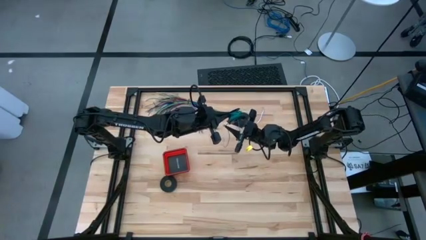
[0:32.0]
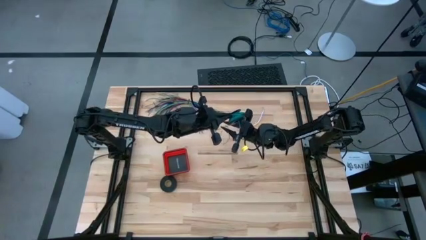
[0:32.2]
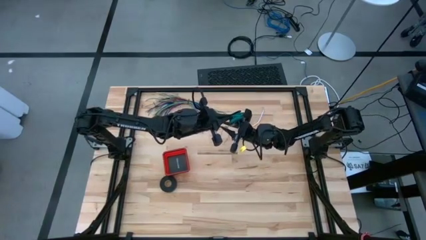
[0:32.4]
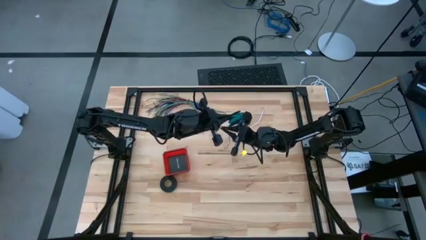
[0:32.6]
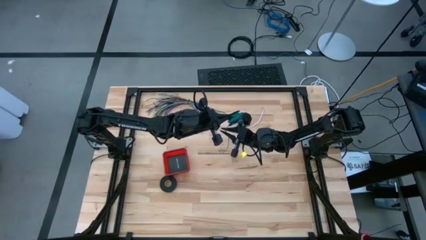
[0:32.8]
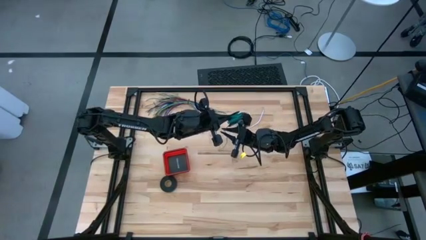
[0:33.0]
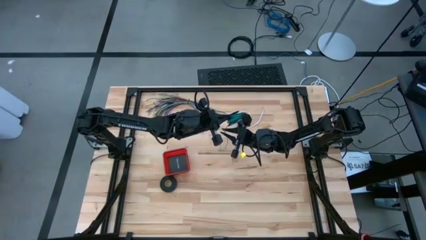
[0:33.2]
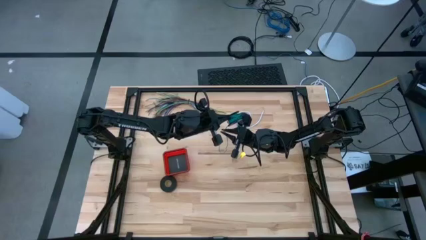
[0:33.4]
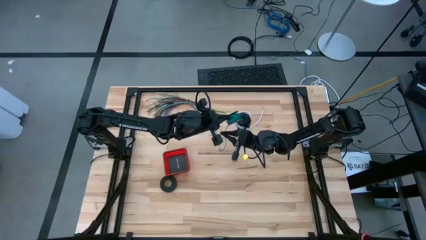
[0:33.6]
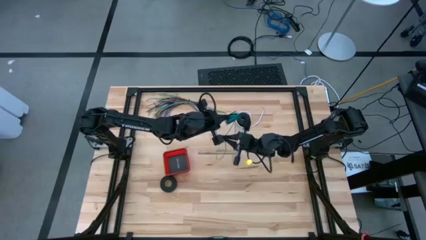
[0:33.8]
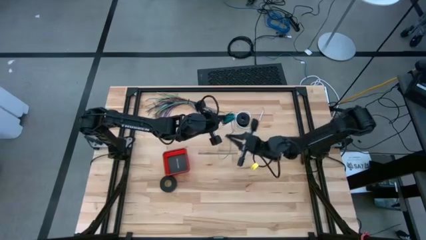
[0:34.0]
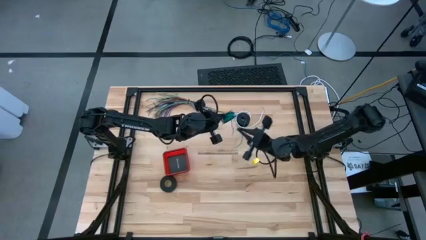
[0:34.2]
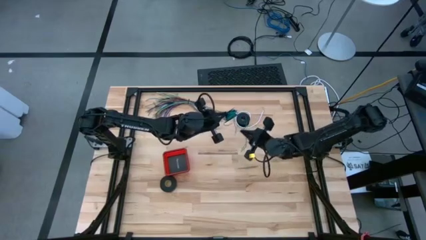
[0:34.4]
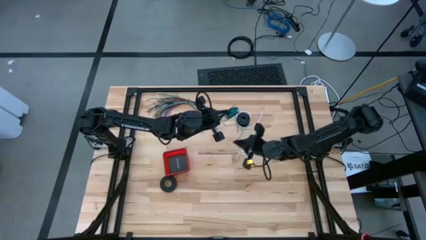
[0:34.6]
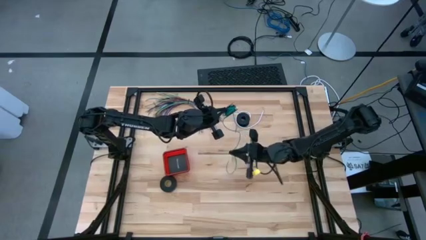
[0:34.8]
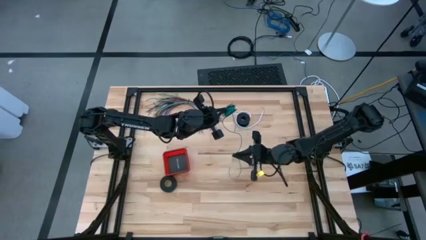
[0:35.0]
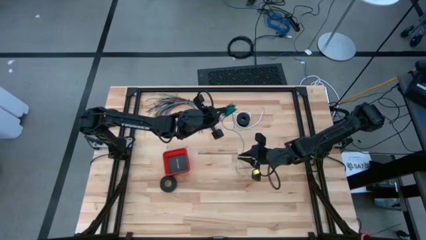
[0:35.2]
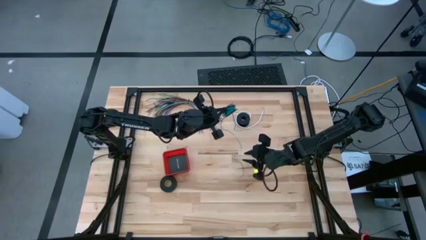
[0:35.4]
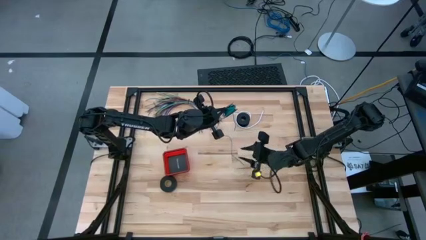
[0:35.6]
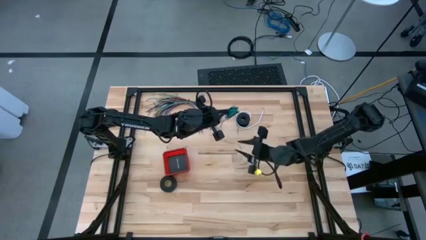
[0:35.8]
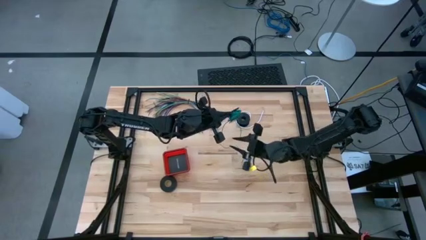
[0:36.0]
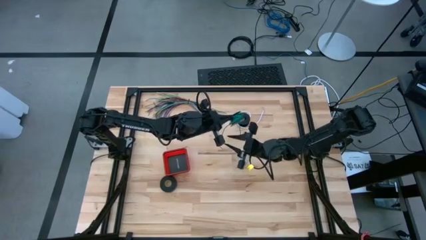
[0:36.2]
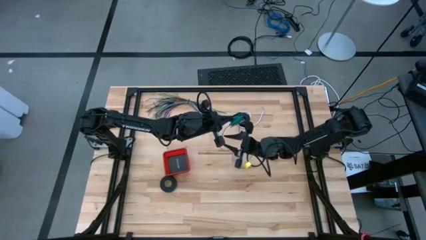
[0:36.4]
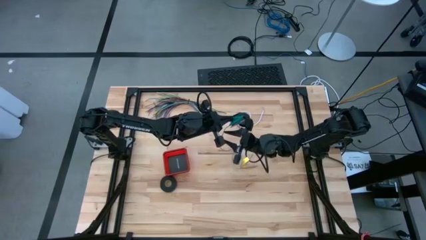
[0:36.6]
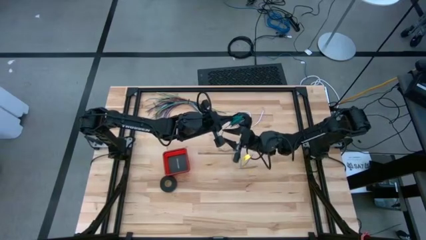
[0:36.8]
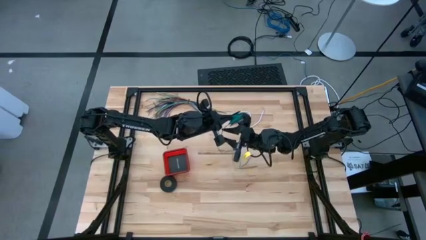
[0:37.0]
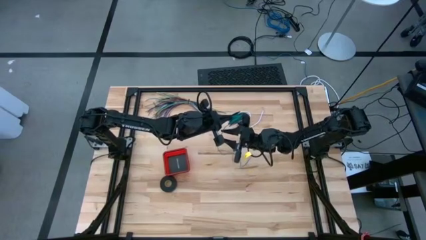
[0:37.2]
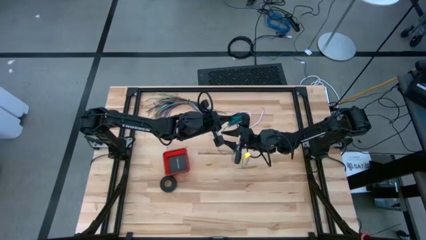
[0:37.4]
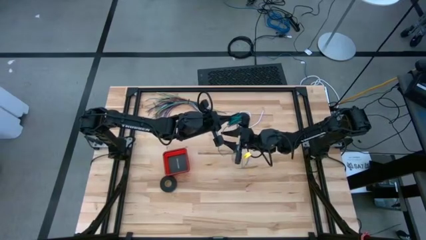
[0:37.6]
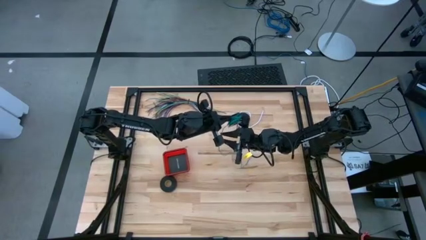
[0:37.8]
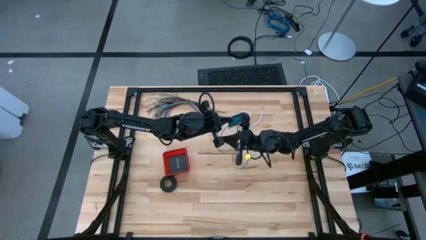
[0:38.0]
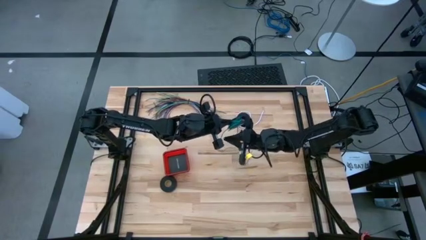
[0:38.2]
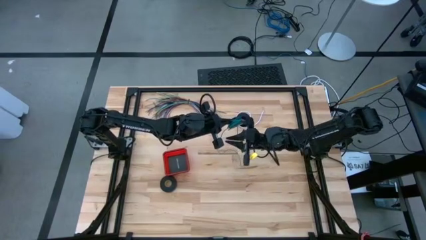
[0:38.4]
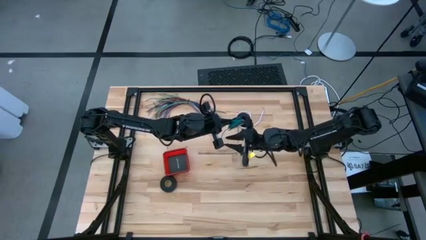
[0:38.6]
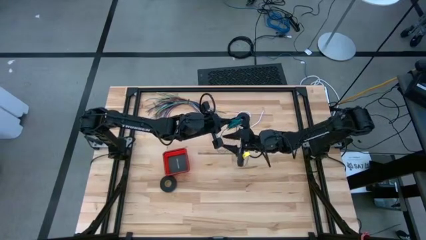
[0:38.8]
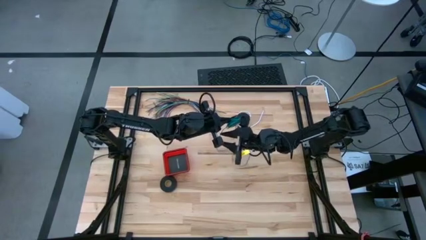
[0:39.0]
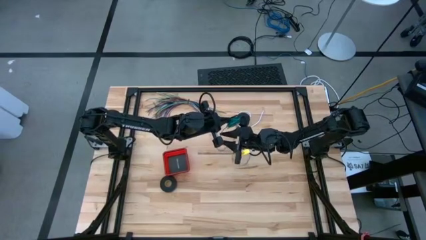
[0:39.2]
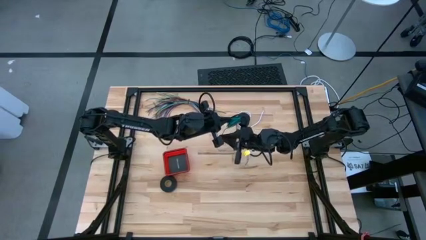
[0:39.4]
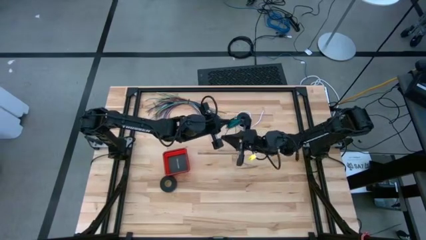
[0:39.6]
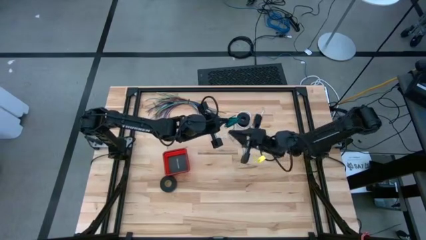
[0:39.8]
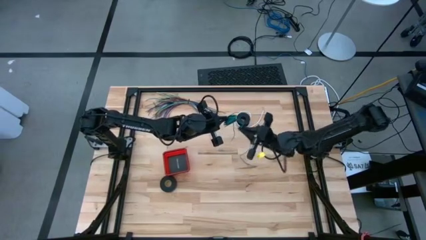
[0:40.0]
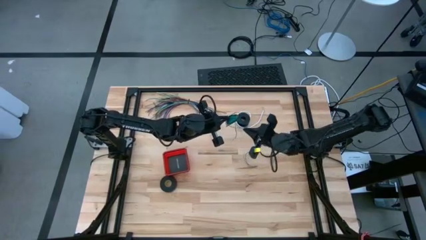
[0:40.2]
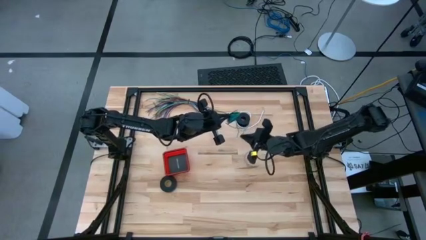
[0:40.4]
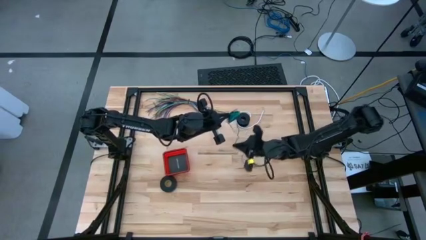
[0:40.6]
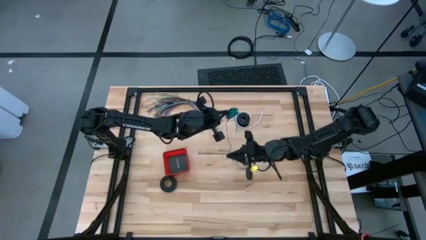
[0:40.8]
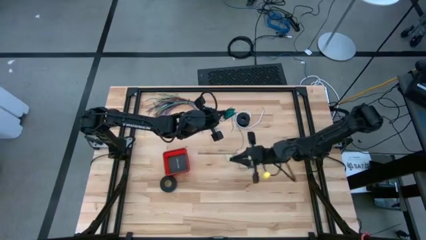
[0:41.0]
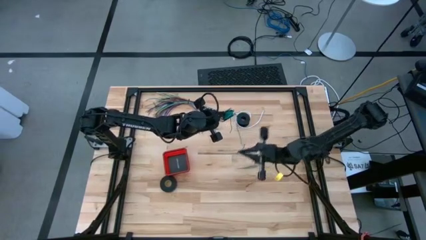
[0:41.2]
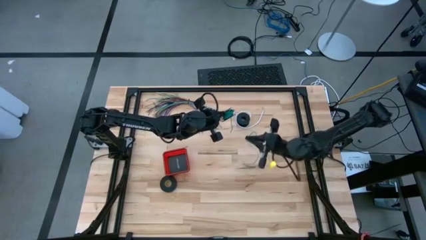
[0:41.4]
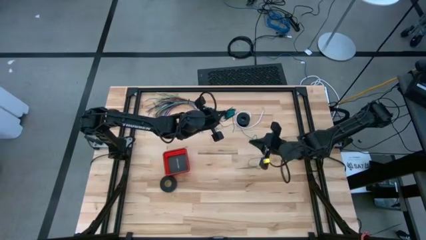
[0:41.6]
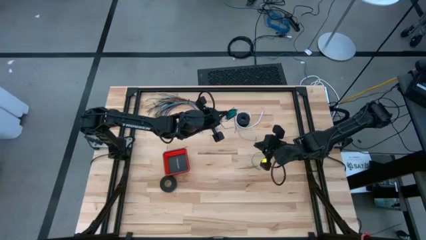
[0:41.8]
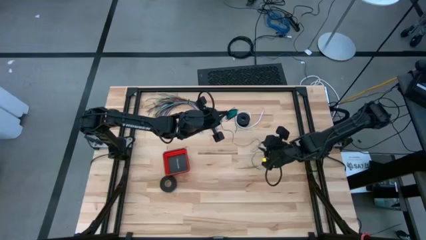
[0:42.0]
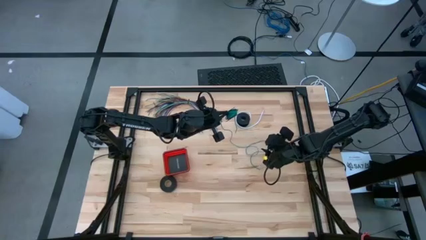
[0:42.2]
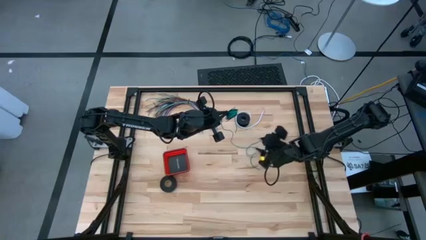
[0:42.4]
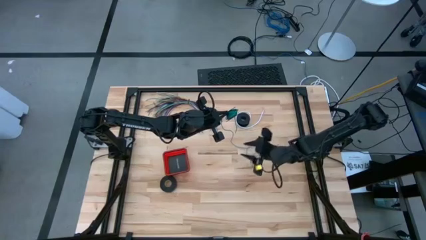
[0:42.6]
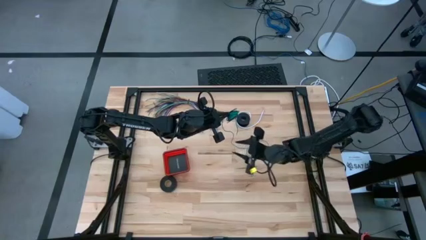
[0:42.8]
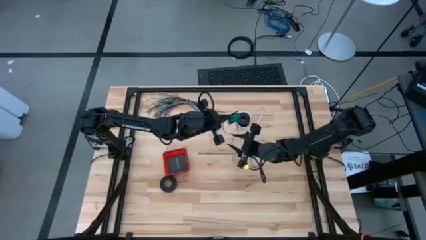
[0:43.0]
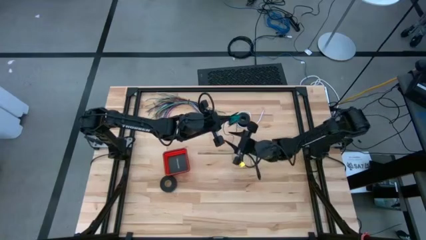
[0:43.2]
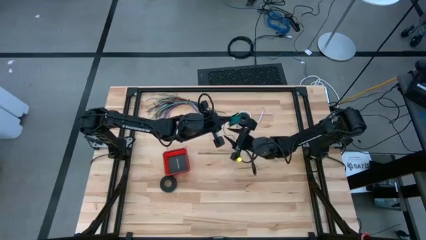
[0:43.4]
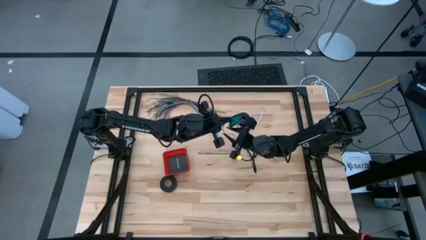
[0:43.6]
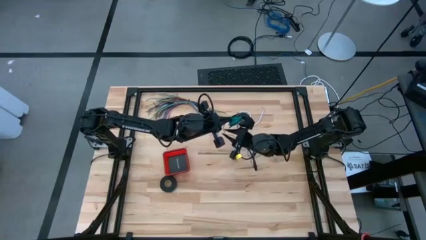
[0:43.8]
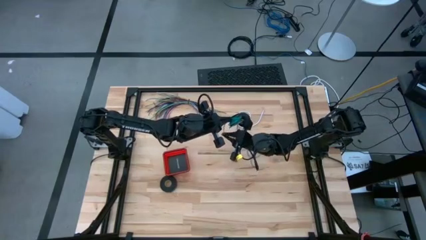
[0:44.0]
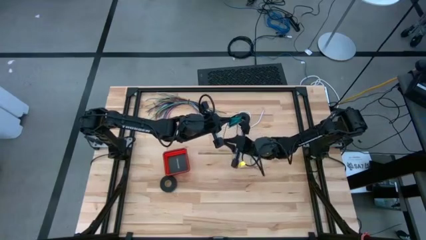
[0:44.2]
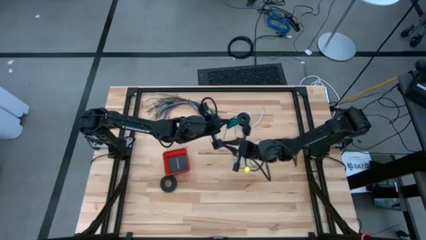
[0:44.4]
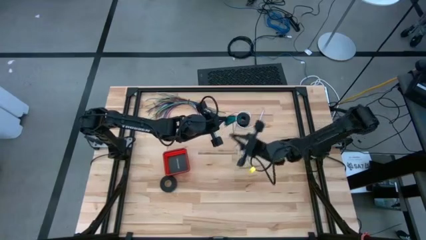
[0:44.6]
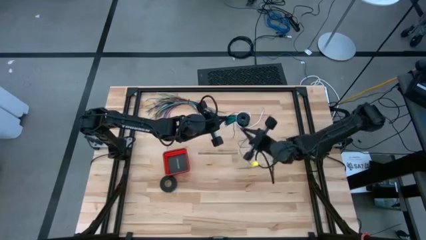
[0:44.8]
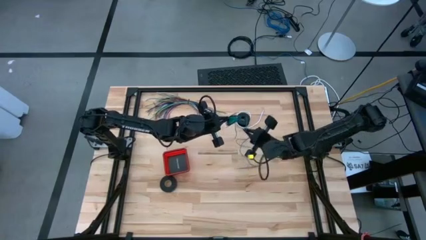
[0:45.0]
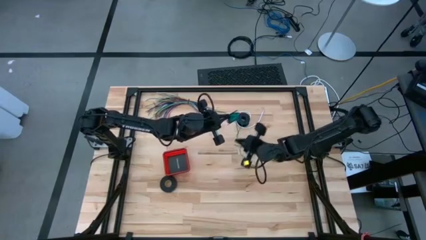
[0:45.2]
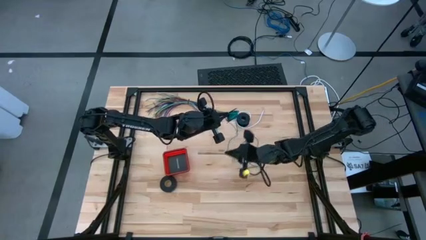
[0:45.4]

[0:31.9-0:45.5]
Task: Coil cords
Uncoil the green wire from the spool
